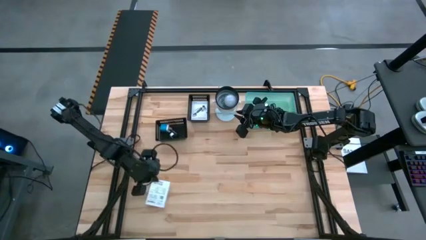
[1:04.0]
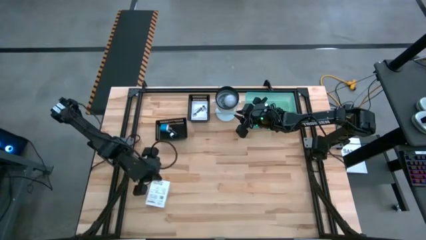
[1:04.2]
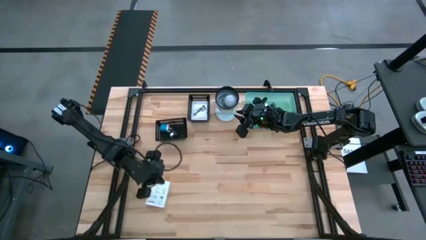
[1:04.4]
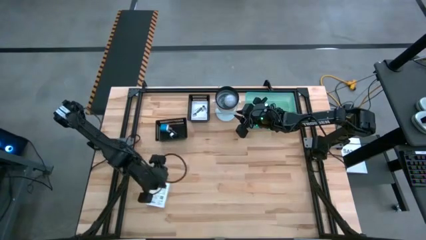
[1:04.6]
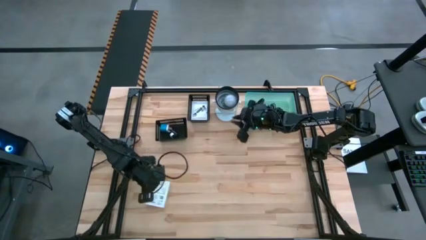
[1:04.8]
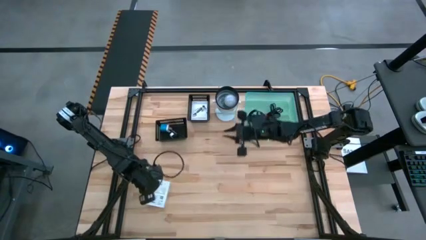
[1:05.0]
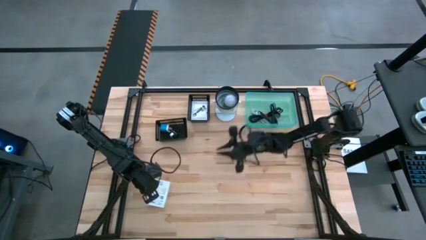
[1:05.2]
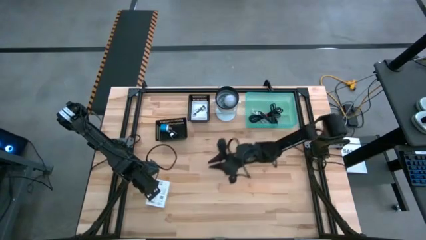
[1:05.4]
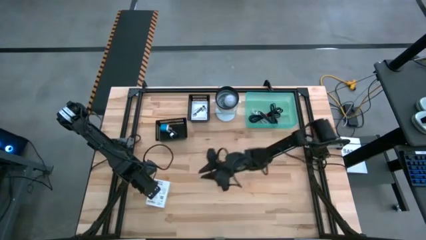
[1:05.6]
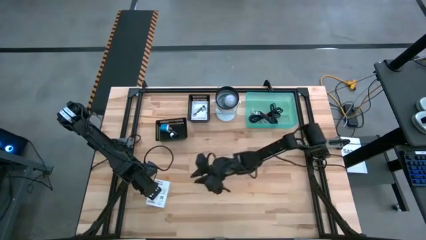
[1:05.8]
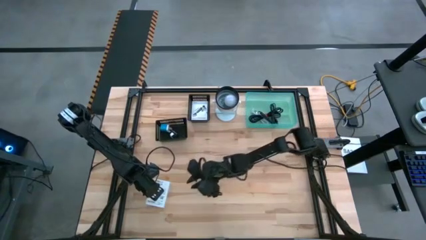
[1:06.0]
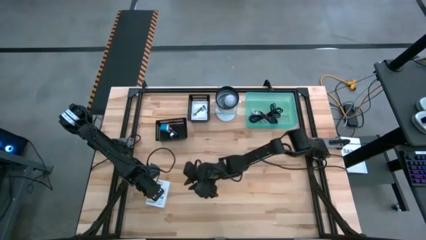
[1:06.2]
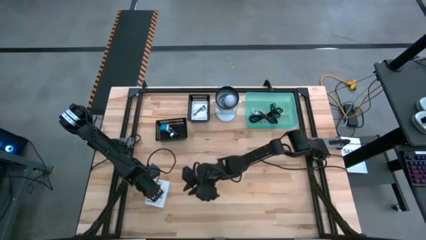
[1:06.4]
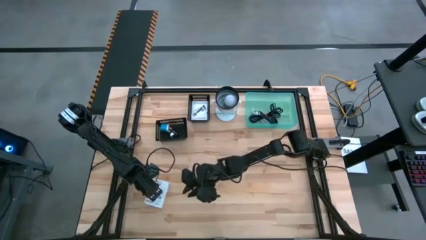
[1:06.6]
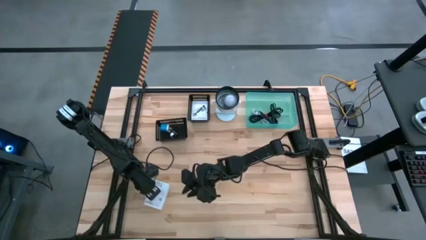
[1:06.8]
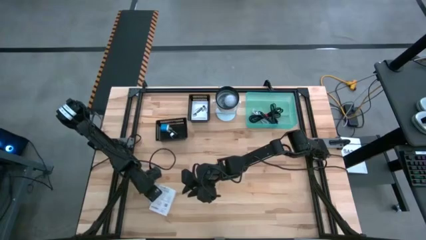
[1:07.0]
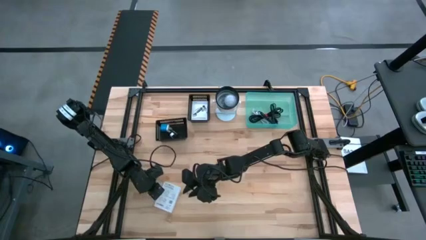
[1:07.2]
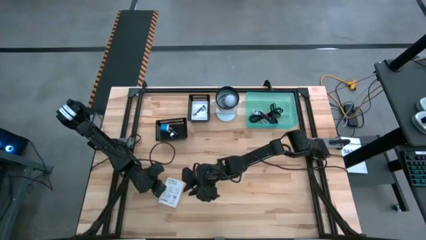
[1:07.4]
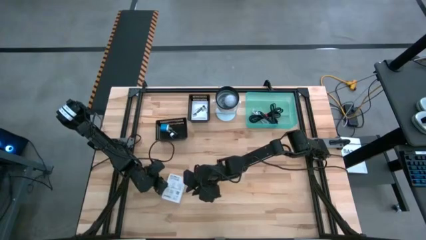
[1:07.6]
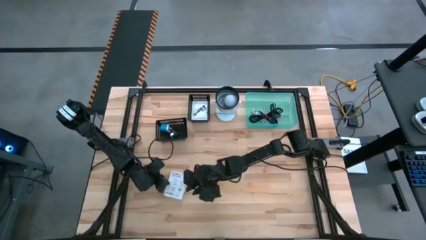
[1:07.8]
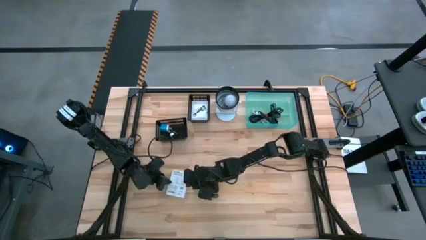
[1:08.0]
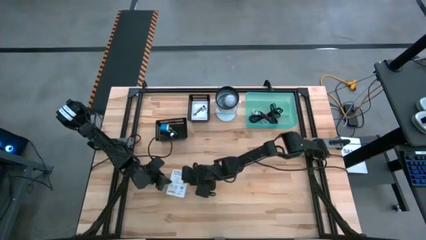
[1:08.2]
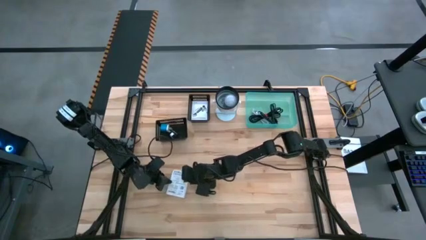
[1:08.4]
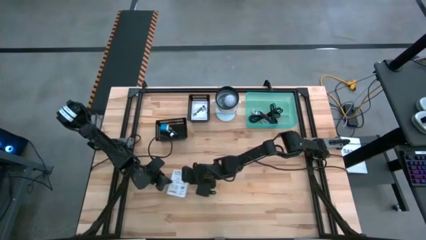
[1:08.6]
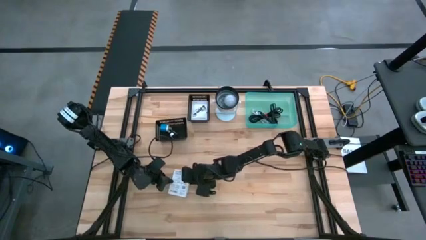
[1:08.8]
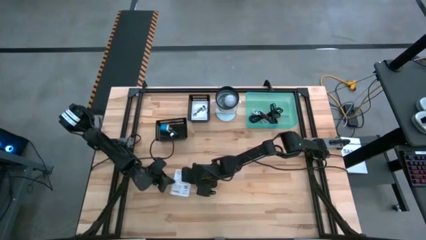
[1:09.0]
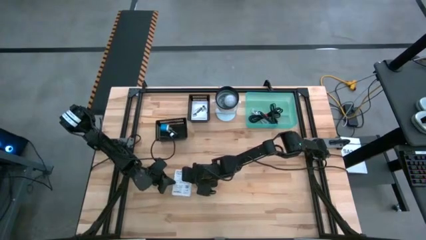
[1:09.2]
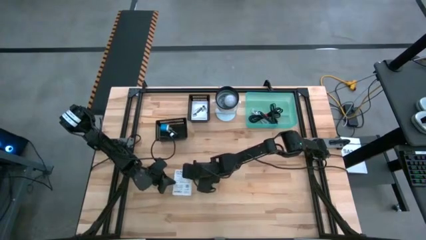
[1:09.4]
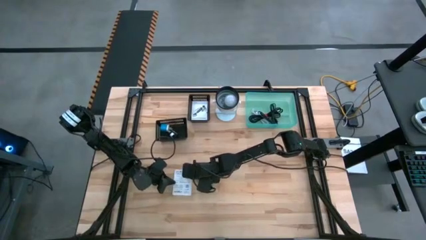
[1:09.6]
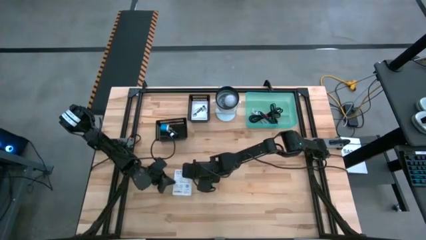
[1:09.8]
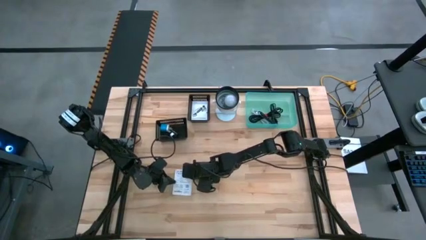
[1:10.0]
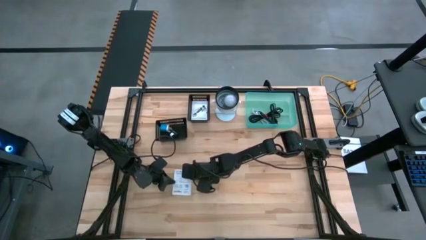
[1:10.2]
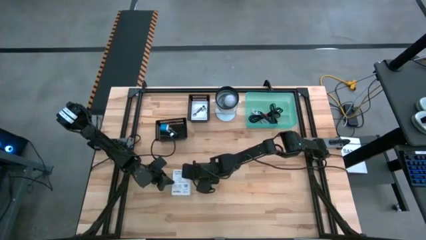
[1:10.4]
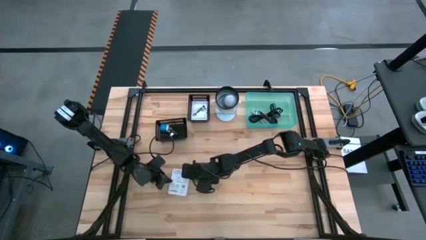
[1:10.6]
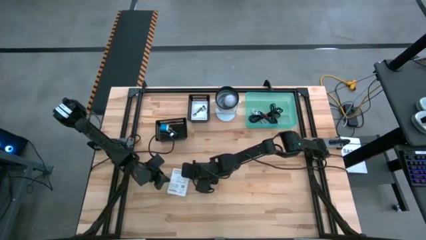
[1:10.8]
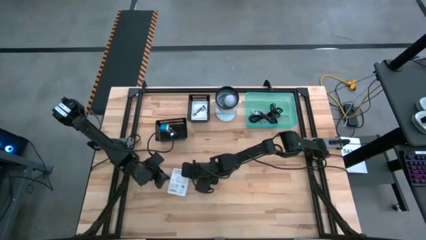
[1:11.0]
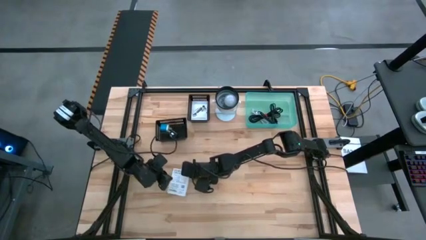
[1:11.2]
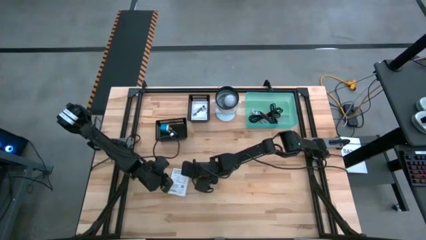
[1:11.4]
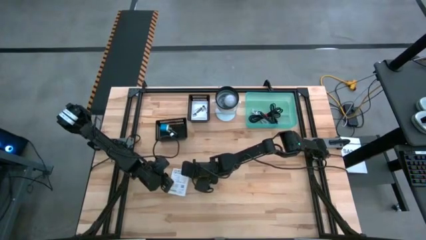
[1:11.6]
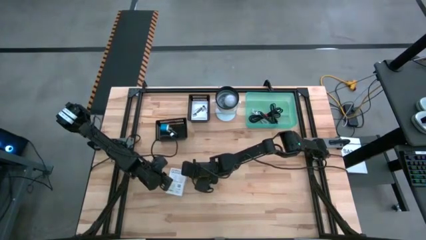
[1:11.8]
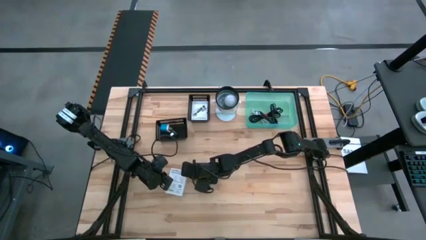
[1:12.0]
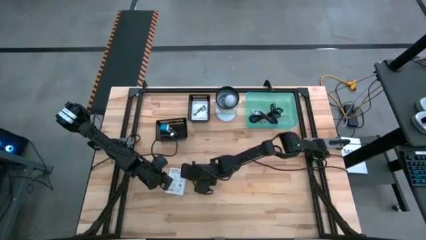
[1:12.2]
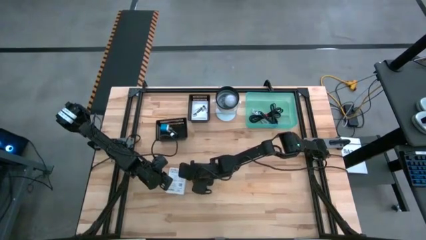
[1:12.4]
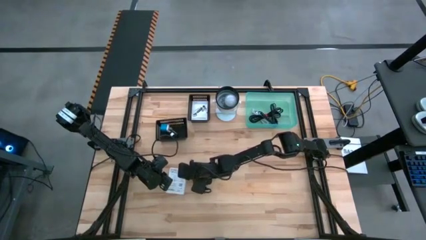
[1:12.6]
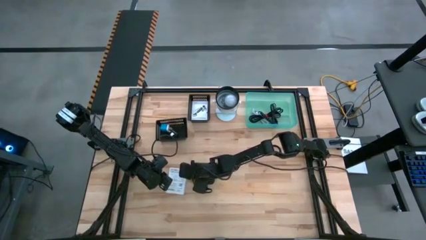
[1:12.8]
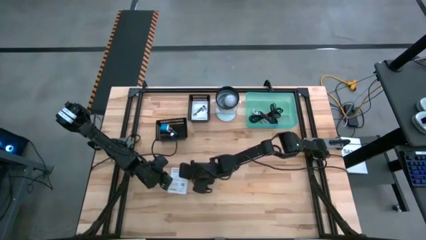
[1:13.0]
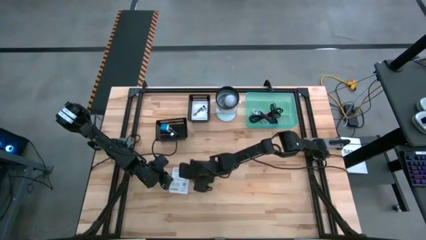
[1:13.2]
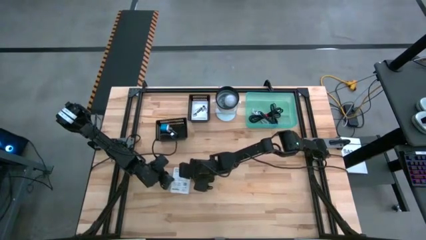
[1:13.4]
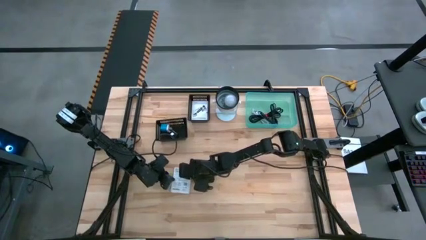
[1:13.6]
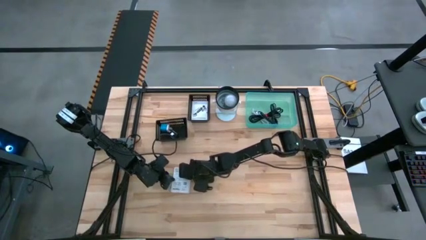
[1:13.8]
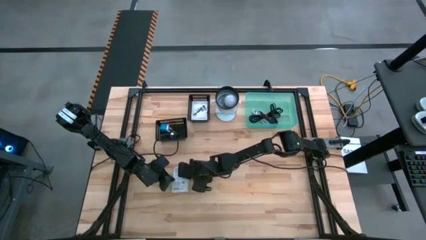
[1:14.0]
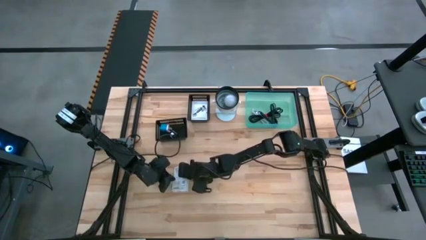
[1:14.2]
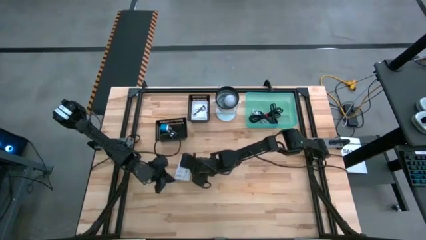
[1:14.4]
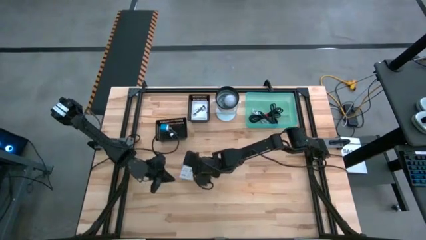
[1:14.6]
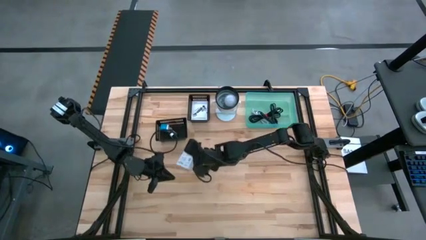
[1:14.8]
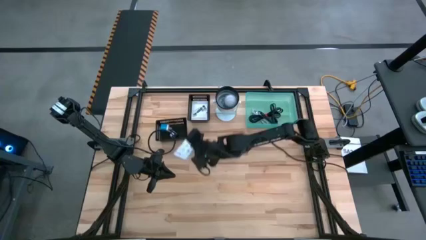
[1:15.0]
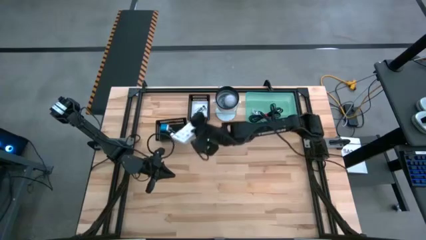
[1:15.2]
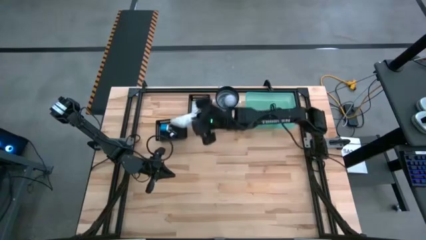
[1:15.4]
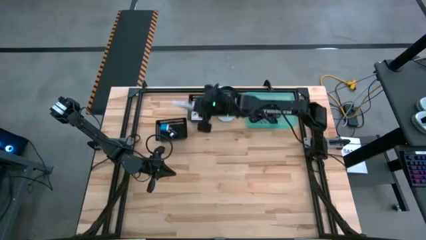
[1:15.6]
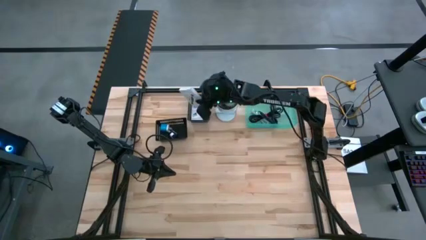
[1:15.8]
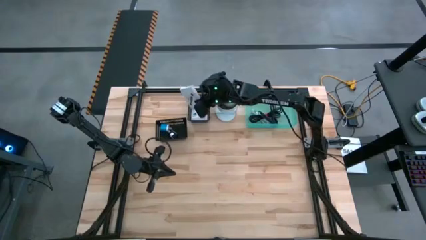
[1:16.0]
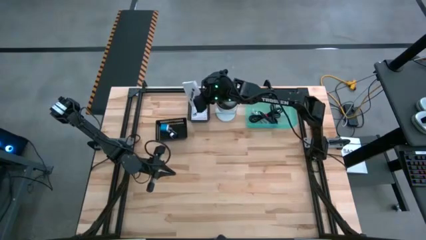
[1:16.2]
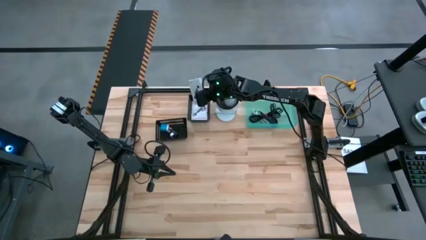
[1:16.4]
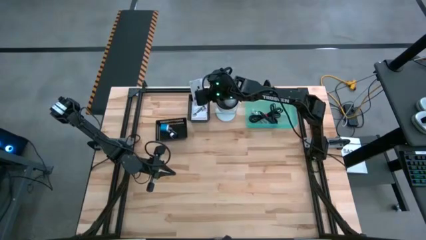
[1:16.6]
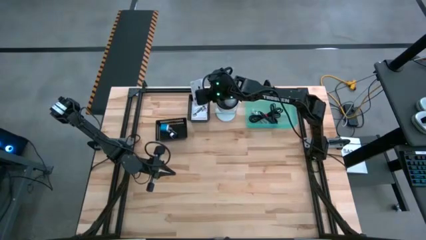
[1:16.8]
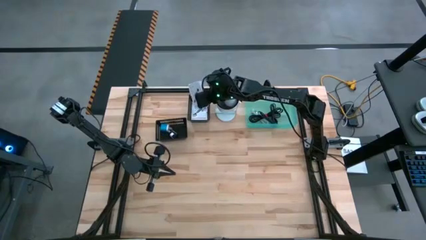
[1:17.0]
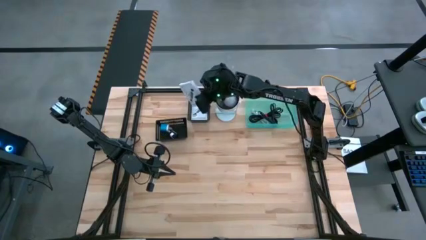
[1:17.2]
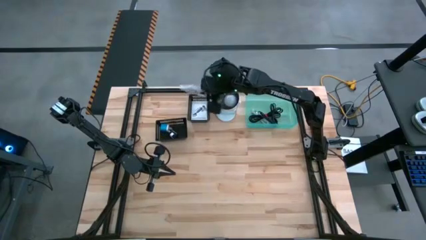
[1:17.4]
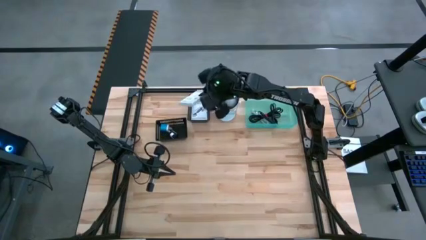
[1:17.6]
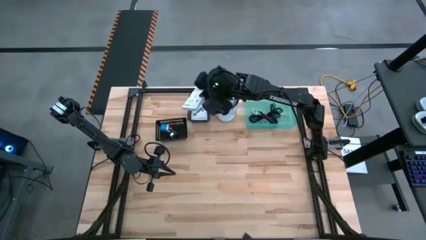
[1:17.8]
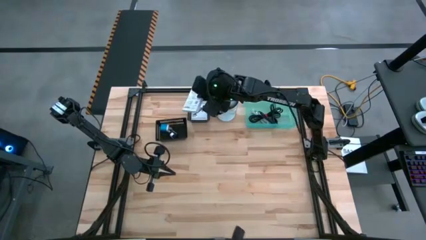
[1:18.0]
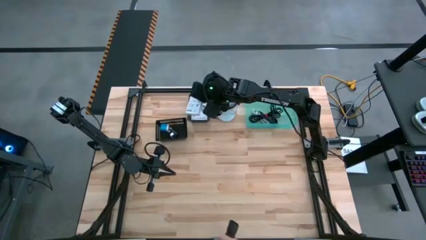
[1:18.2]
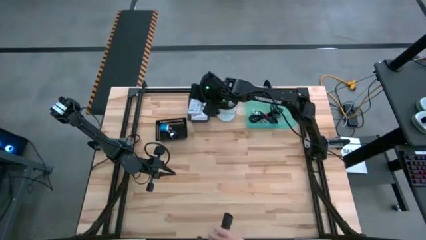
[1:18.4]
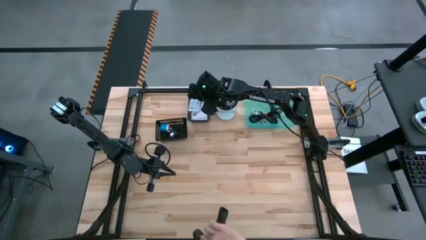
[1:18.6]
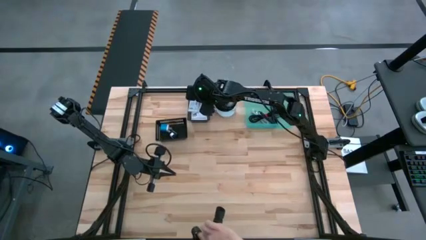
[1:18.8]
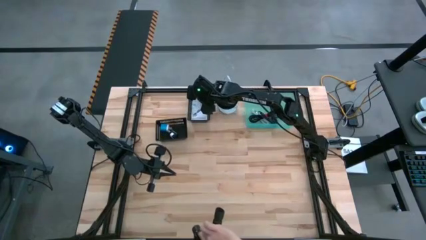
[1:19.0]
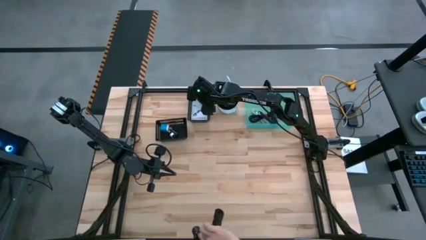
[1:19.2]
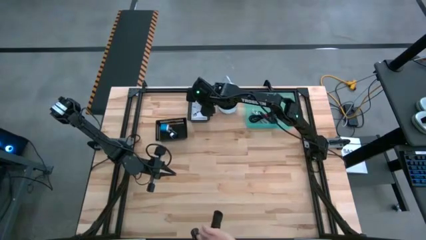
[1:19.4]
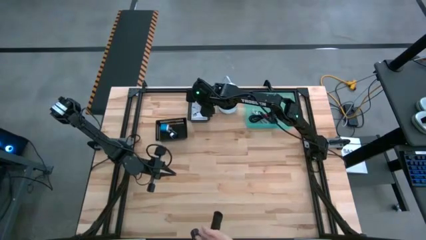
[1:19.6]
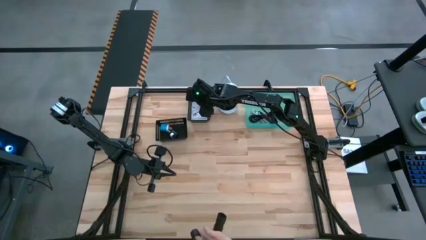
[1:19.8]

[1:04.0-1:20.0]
Task: Pick and place items into bin
Put the white box into the top black bin
